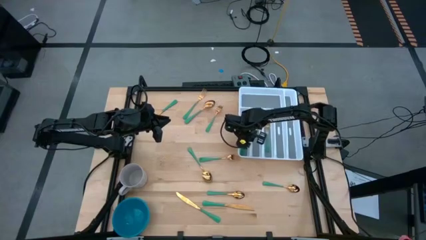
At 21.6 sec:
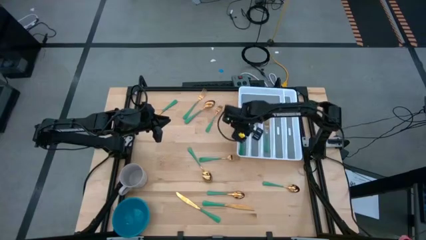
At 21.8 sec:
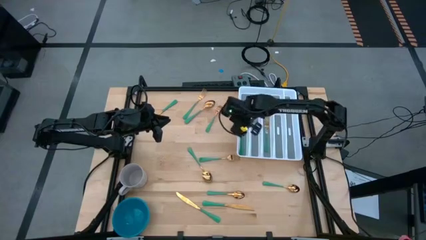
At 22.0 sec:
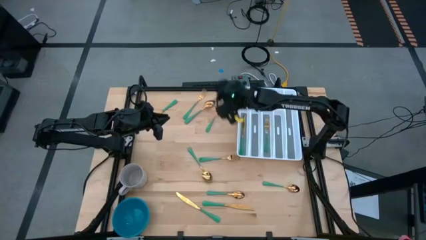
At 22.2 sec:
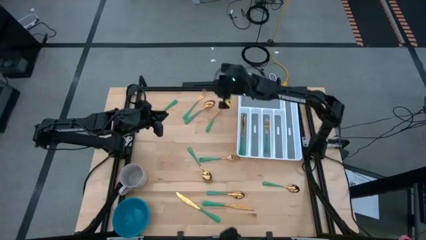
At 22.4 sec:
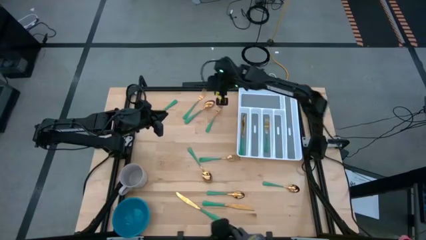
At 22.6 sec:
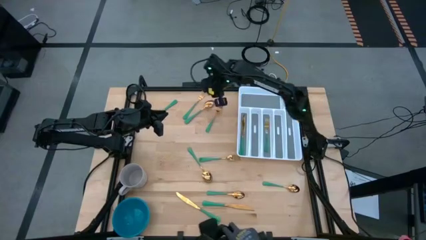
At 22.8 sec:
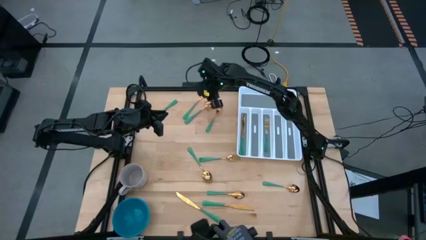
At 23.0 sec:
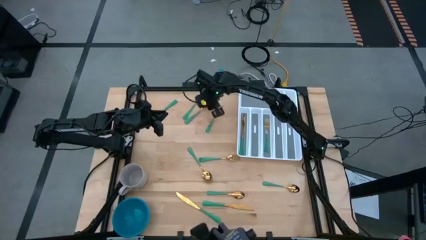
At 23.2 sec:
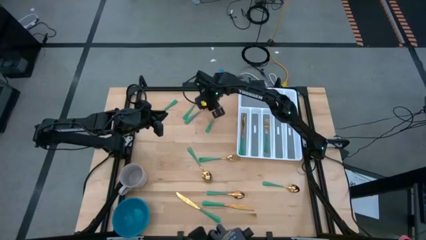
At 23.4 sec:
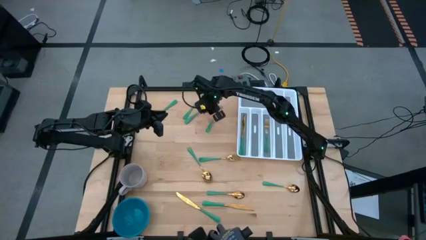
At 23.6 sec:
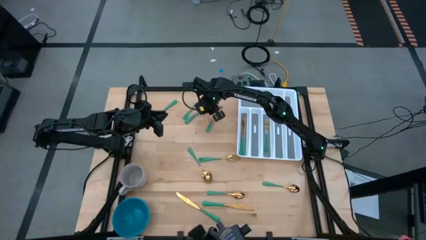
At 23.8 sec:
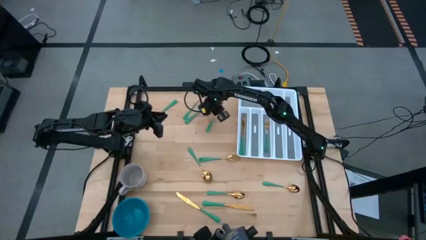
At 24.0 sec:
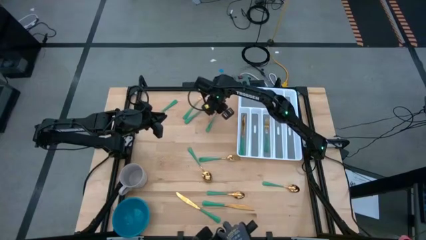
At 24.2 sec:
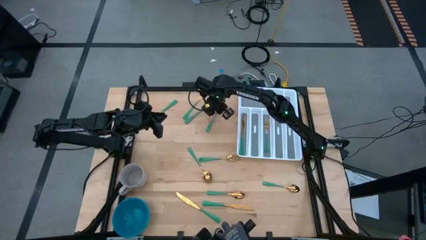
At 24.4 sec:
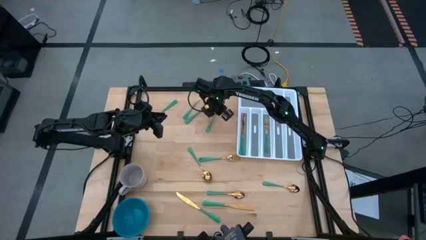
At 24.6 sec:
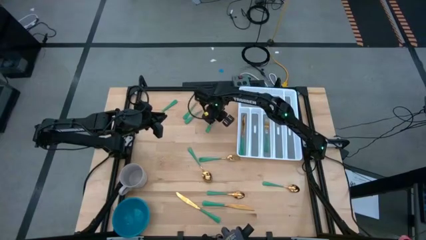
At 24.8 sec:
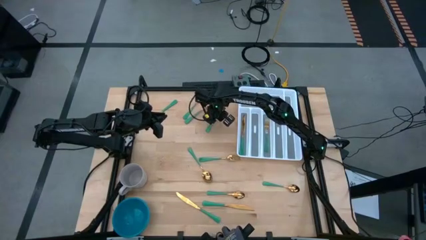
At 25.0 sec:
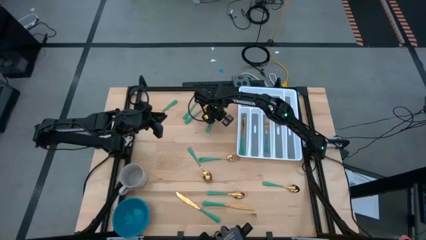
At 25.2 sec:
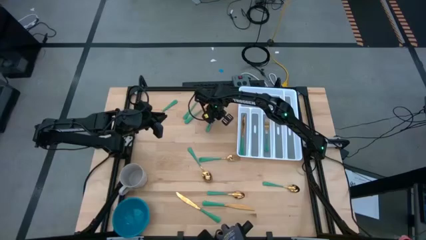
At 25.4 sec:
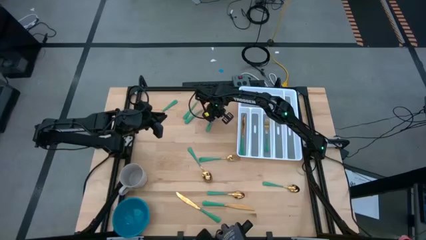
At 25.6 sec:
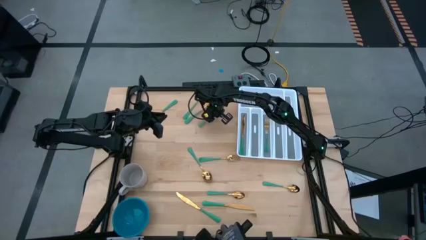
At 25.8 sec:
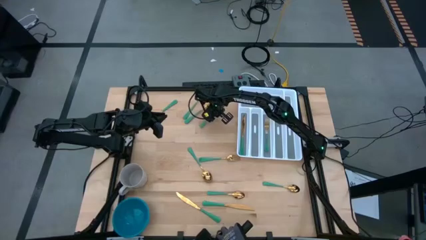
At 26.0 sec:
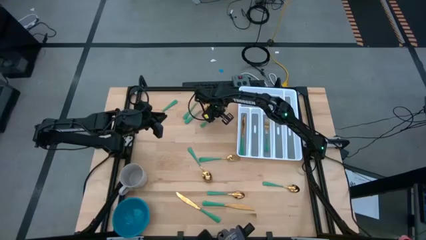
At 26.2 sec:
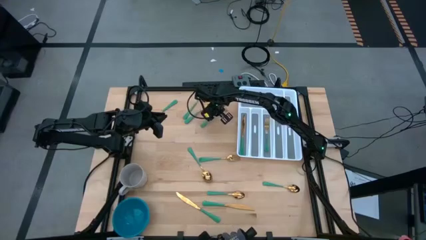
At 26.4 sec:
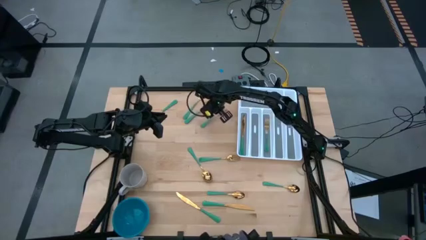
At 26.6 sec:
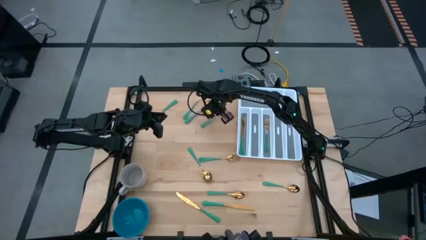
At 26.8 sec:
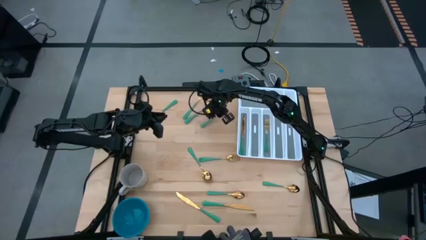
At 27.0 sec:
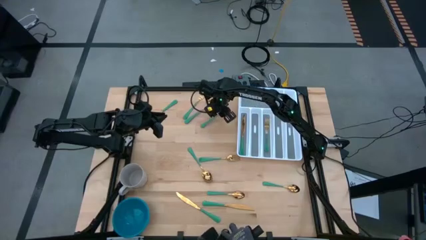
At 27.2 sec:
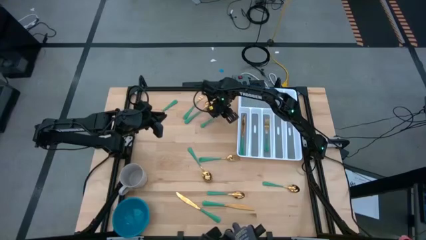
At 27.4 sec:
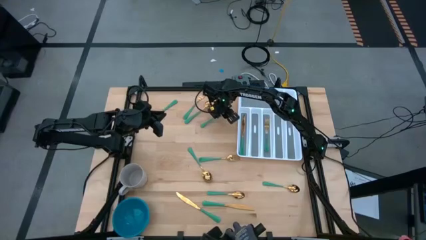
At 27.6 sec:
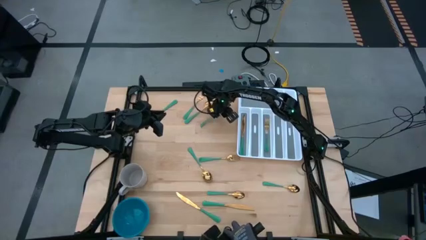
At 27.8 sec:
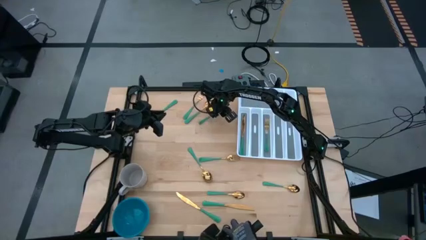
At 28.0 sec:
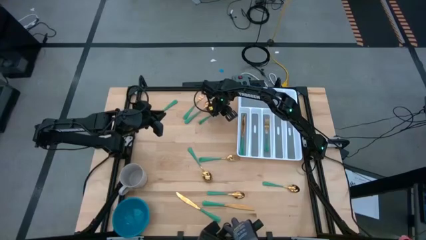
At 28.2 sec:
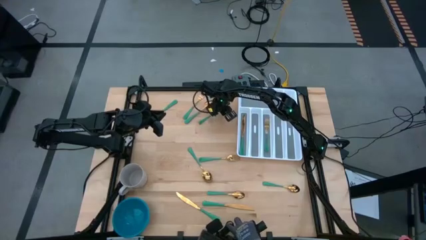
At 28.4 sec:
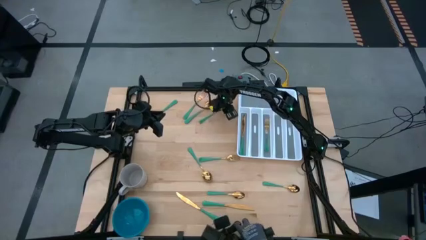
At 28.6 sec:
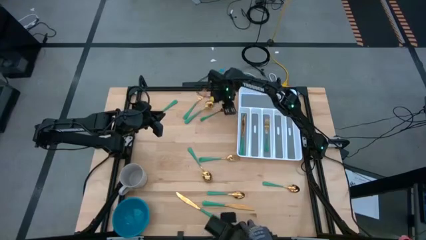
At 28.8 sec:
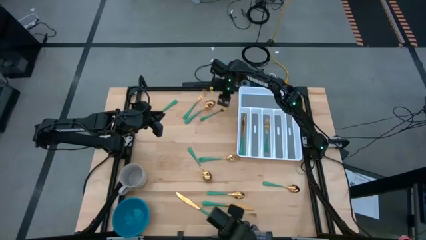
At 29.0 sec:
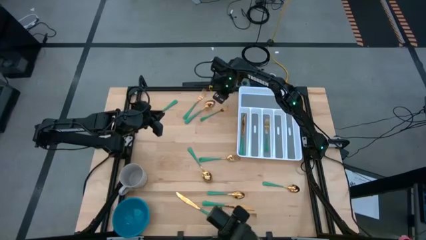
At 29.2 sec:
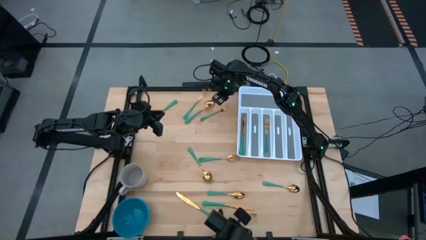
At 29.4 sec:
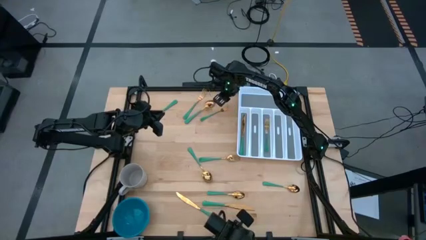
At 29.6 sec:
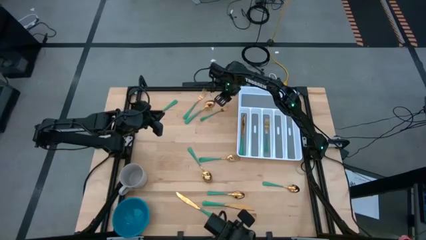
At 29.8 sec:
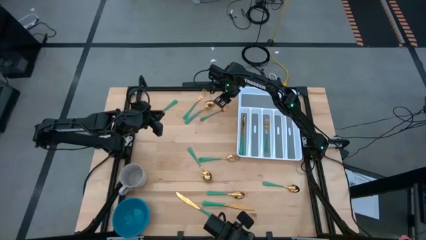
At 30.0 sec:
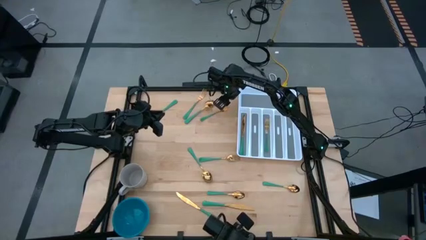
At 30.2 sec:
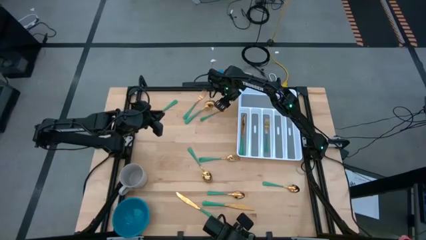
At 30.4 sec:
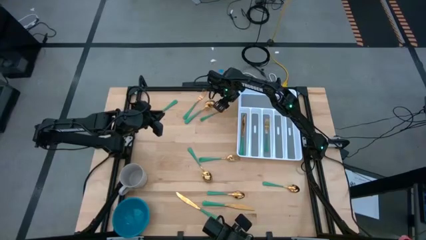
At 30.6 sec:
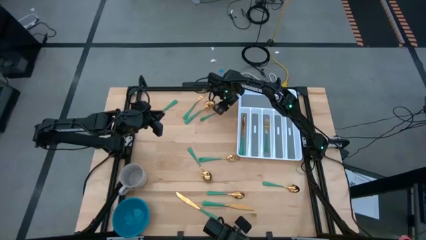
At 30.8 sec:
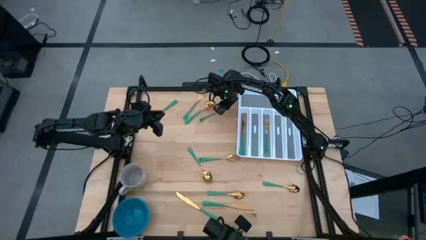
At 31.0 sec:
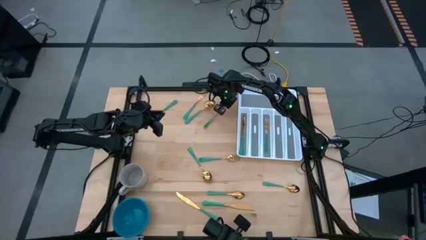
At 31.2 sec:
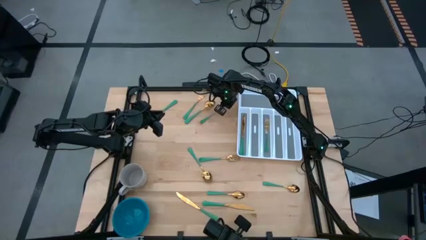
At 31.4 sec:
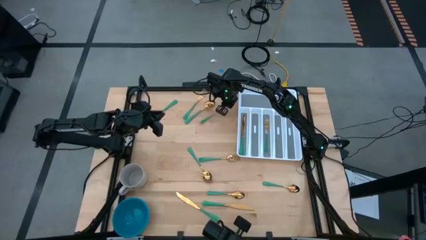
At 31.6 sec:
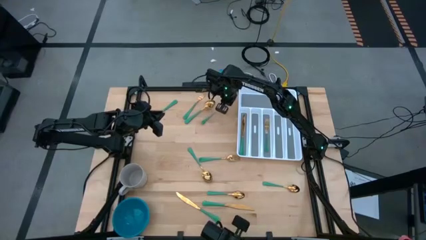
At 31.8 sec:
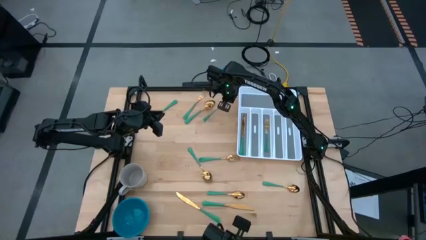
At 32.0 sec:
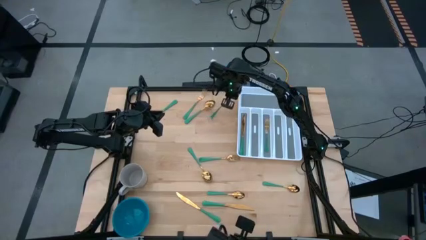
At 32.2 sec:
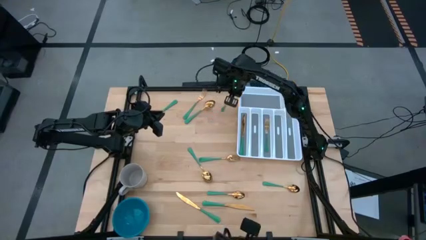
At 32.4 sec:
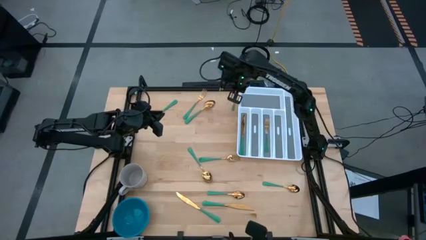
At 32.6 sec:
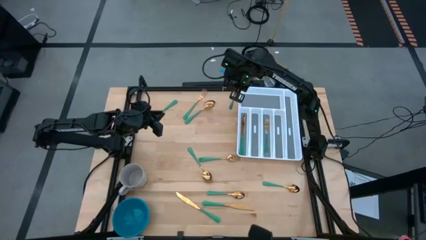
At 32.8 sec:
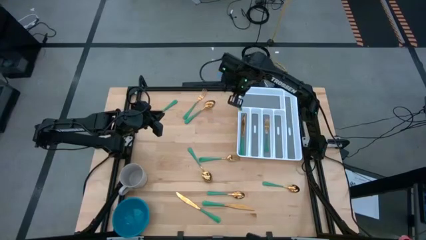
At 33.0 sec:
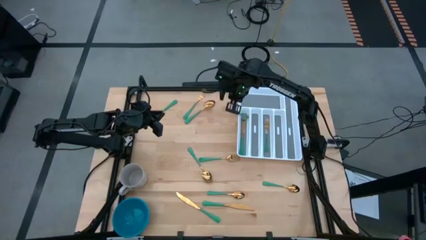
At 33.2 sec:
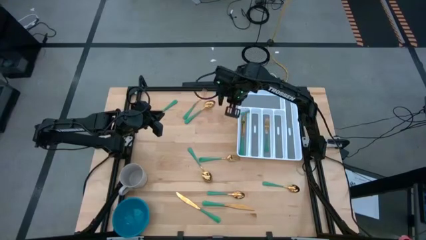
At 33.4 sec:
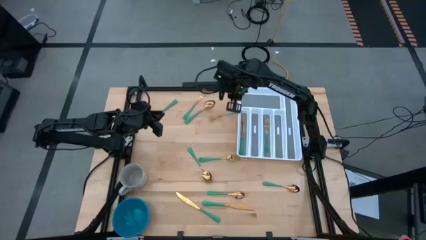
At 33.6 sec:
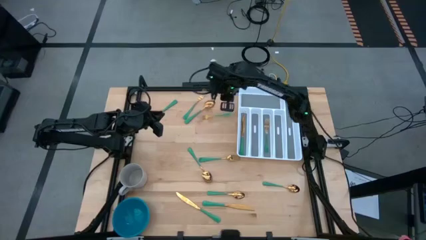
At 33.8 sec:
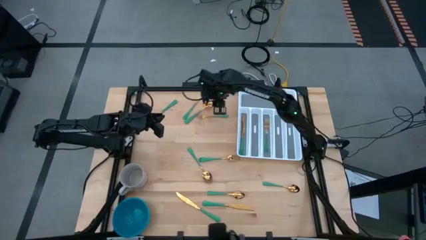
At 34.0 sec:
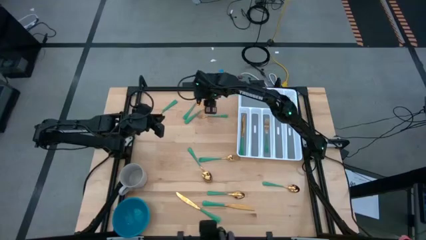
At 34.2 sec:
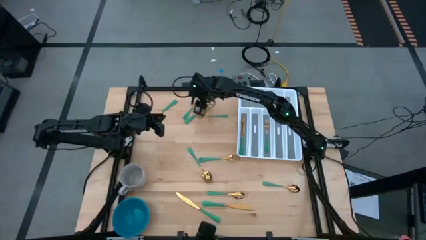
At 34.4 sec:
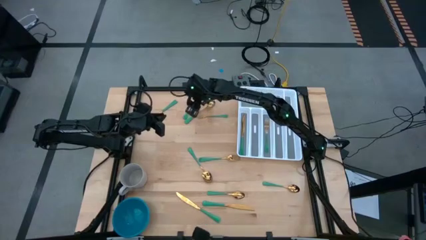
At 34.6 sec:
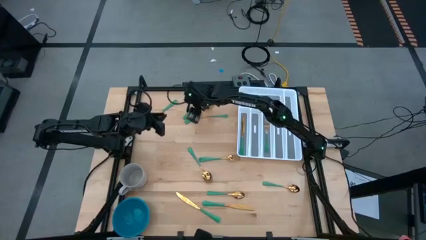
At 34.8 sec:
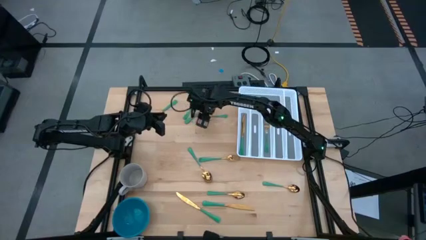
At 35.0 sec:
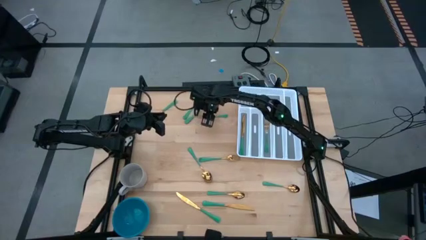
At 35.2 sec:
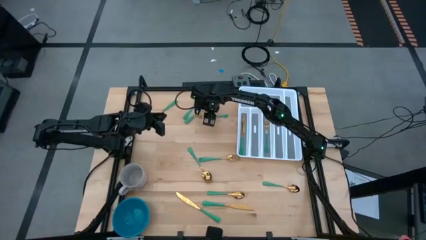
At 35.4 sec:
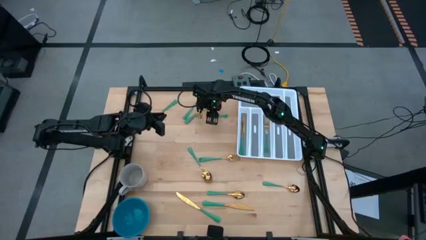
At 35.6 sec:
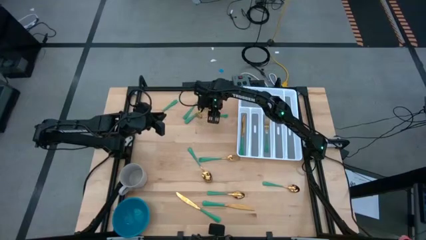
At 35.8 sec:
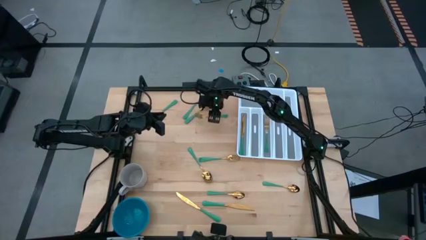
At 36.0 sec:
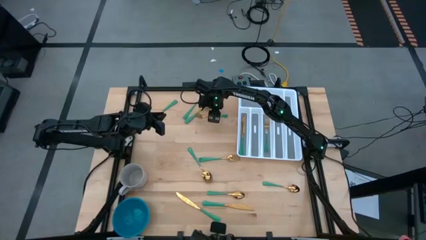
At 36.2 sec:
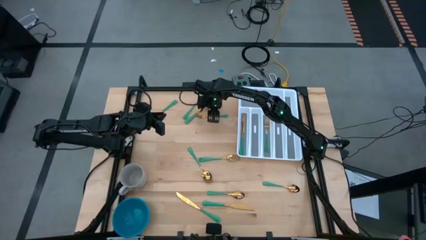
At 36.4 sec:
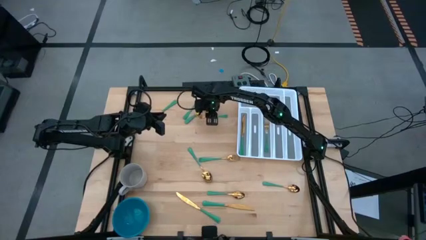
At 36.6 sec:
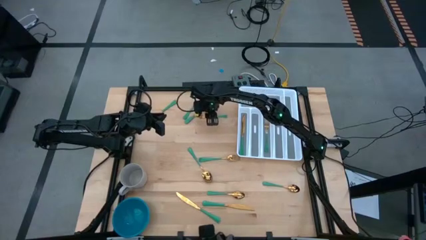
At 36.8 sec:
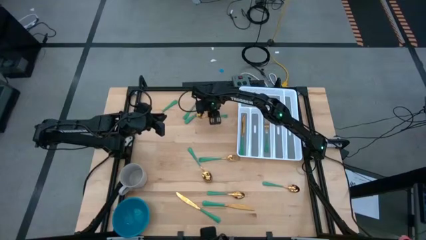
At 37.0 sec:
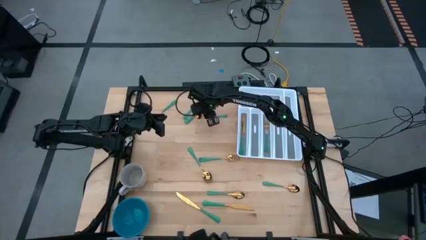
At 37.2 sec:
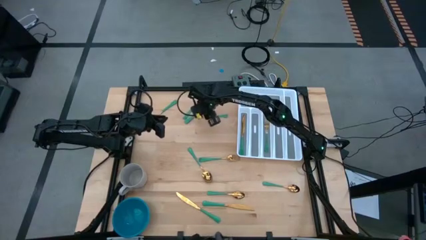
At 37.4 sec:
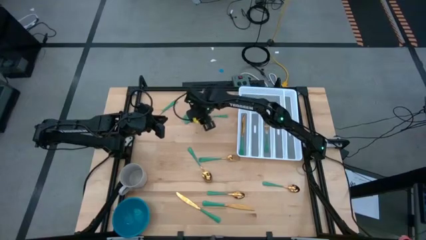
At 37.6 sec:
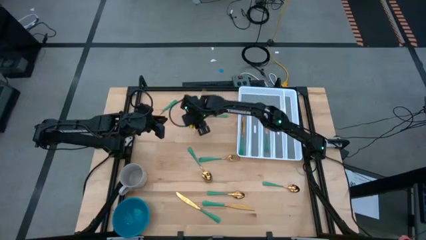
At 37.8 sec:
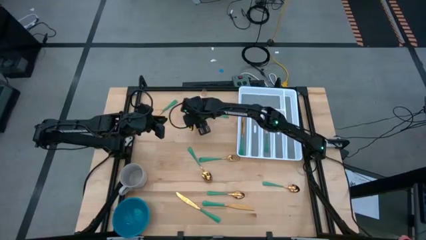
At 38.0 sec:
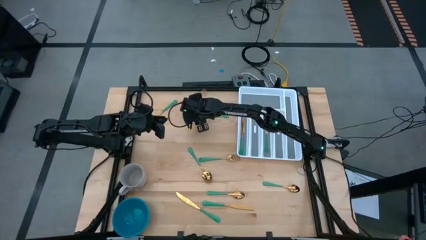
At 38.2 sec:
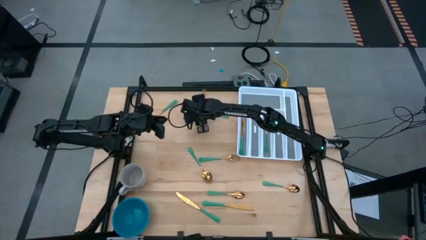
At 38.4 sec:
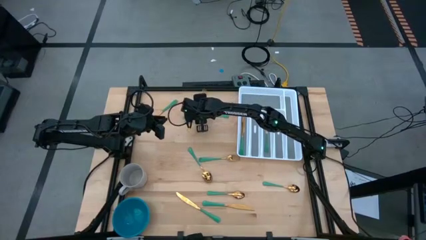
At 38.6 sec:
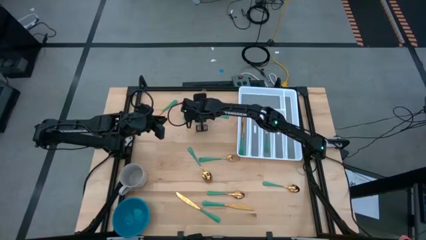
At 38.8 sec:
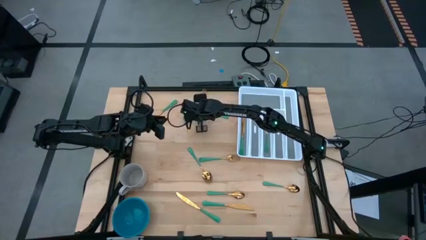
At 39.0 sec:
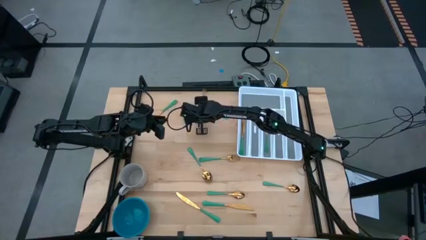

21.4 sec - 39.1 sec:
Task: Sort silverware
Put the top right green fork into the white cutlery tray
